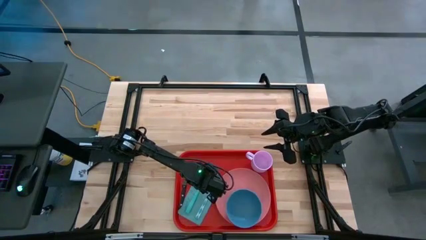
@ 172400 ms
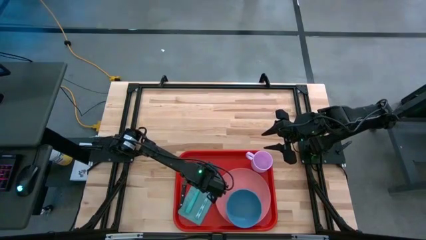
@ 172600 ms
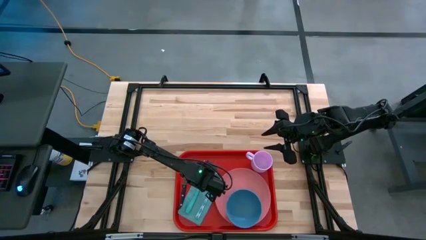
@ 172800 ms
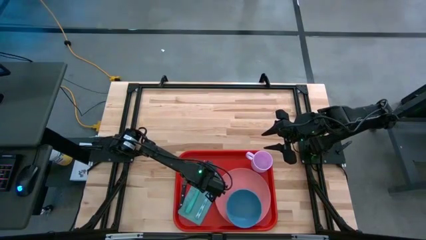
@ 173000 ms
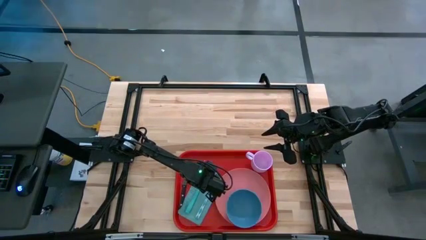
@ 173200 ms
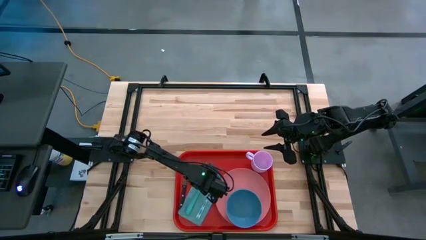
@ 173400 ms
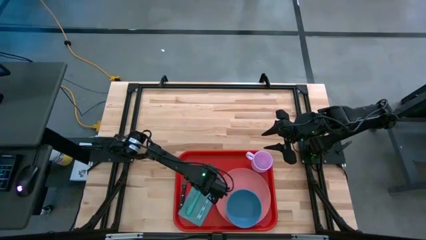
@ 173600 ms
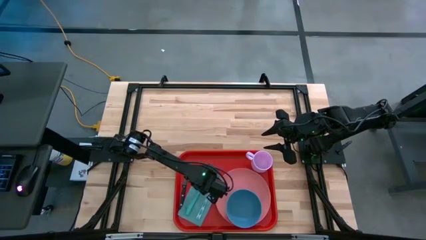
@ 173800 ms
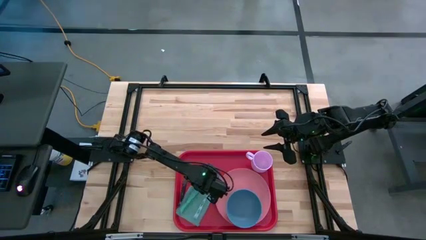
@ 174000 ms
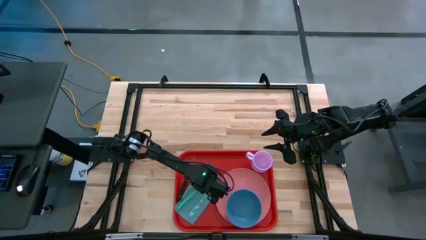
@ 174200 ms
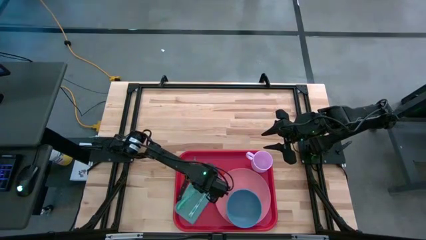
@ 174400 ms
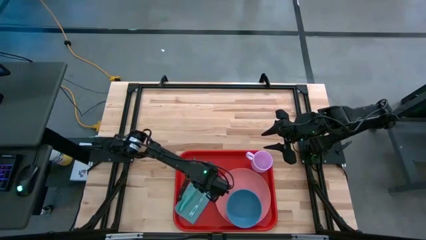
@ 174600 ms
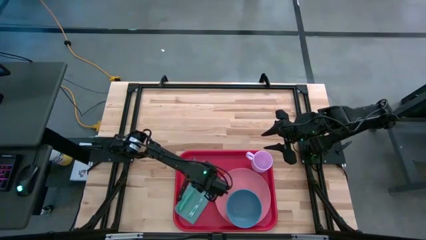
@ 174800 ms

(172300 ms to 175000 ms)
Task: Set up tray
Adjust the blue spoon on the blue napkin

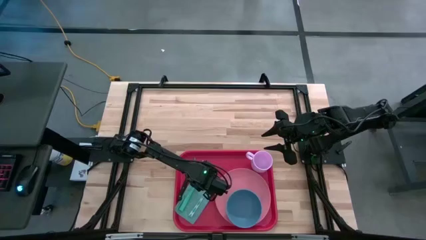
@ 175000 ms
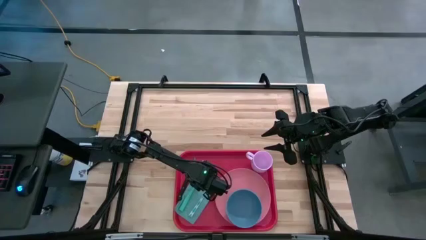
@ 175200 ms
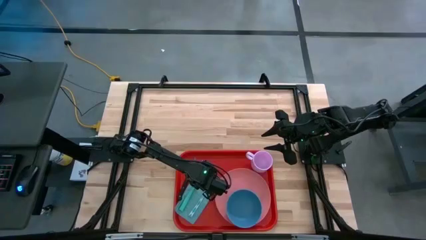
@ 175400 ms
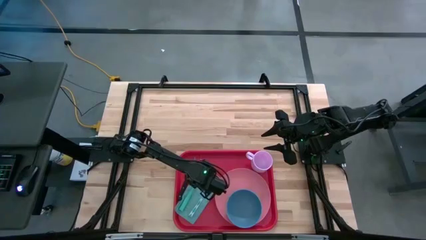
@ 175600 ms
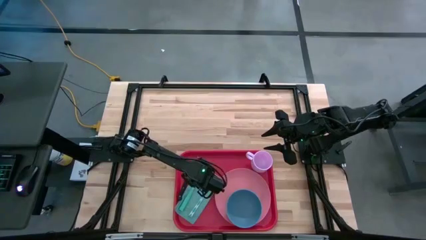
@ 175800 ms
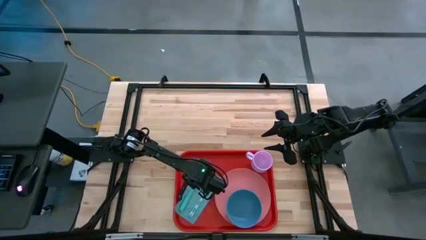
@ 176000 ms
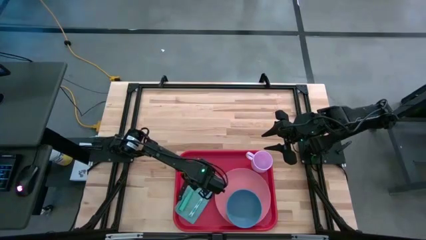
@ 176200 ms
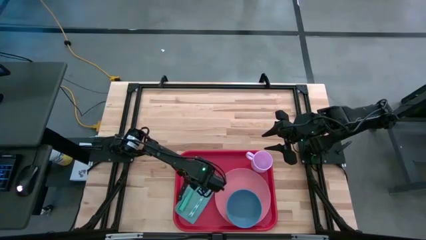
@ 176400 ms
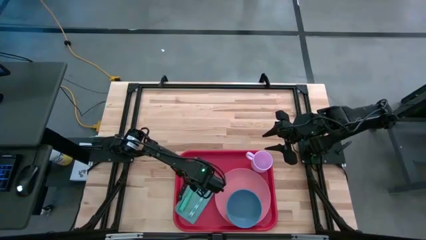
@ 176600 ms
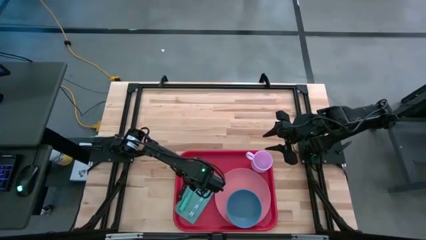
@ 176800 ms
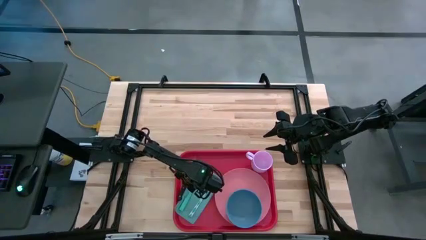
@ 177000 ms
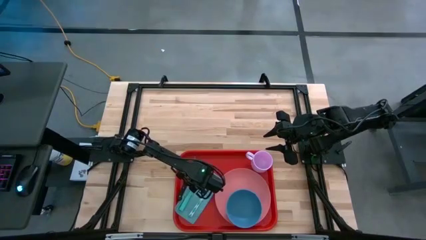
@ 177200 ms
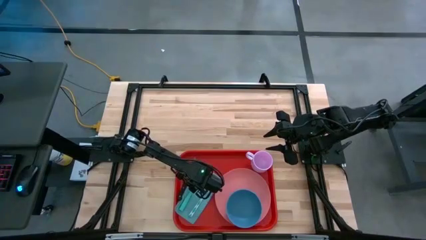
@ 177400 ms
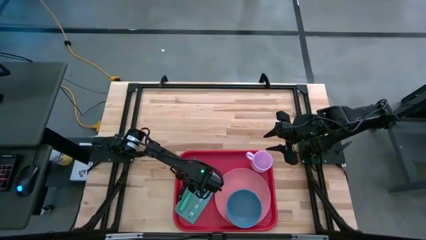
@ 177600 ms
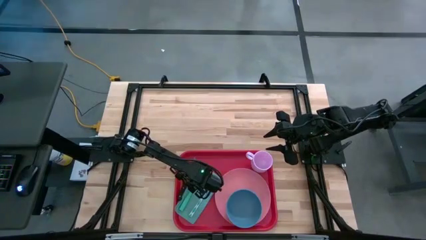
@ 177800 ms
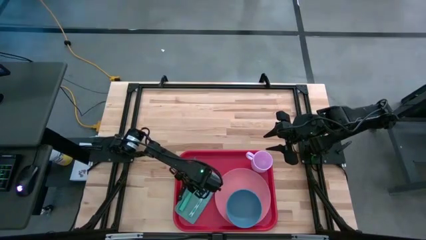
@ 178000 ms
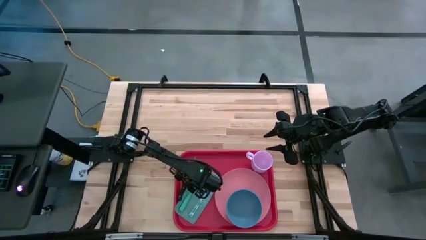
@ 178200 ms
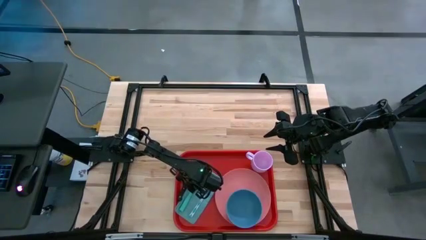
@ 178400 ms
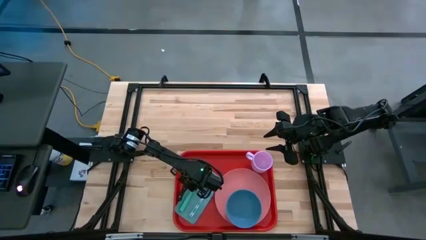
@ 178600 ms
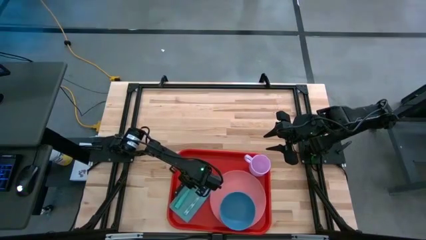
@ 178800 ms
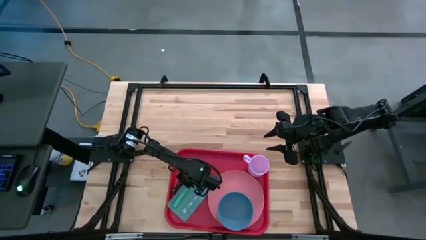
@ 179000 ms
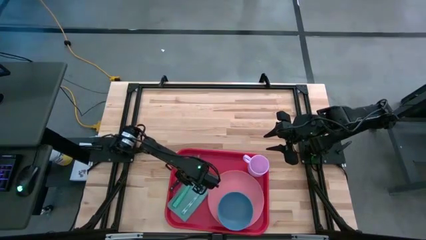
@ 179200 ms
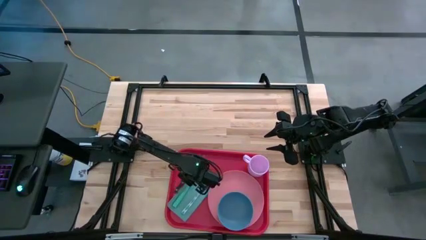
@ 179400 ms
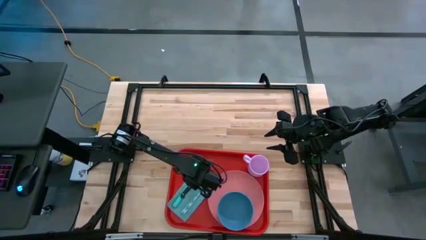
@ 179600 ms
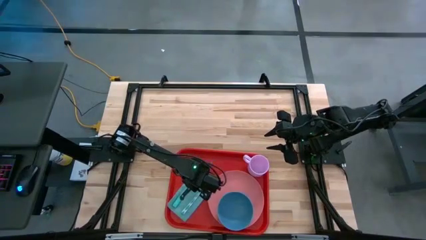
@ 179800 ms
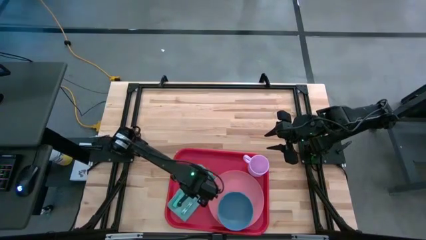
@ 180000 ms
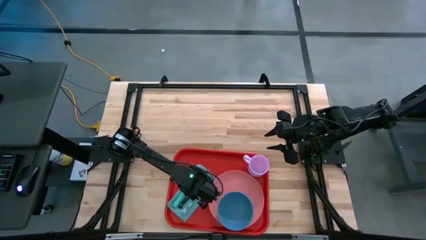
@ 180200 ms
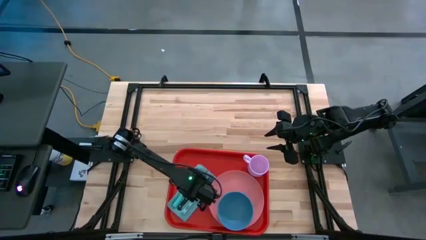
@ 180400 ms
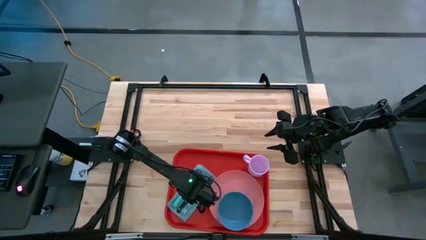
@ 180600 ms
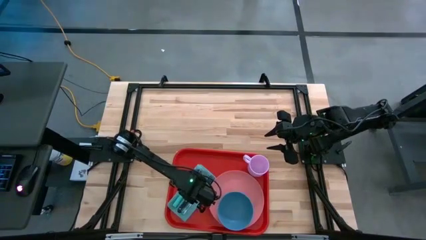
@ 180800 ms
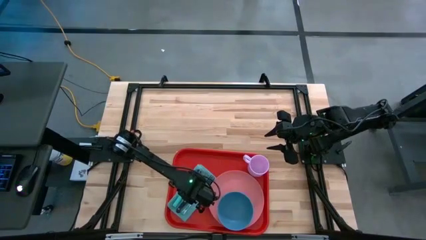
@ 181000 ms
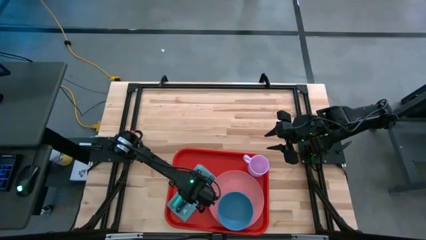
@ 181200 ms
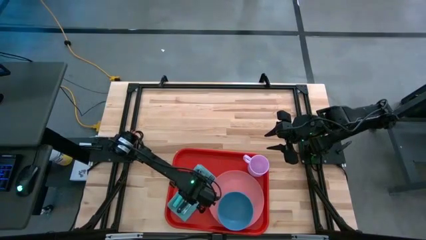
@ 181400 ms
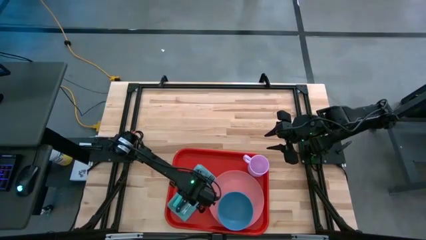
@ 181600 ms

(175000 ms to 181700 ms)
Adjust the black knife on the blue napkin

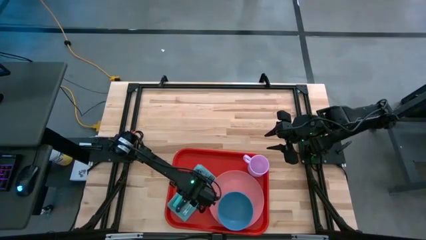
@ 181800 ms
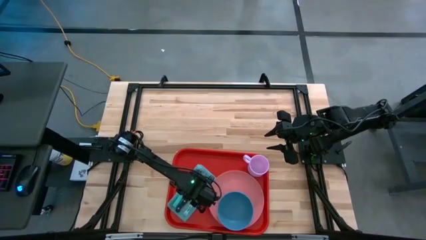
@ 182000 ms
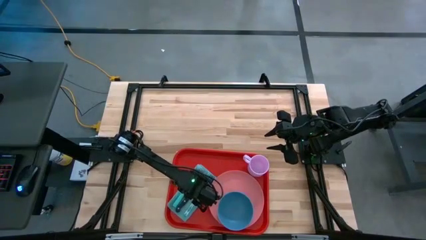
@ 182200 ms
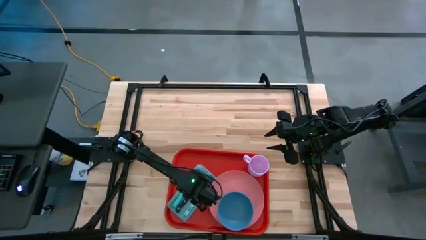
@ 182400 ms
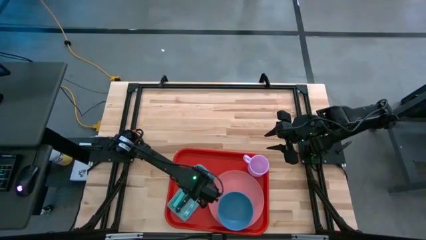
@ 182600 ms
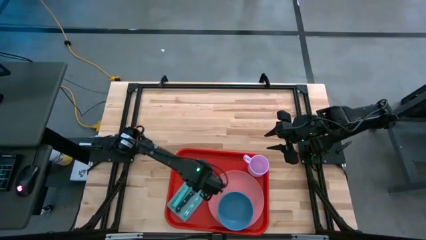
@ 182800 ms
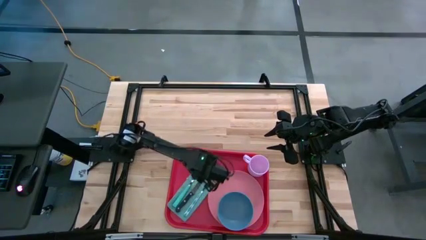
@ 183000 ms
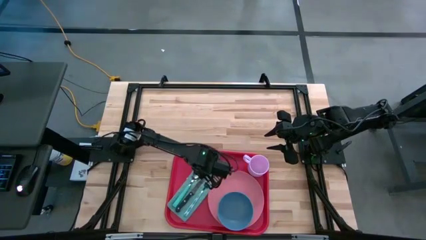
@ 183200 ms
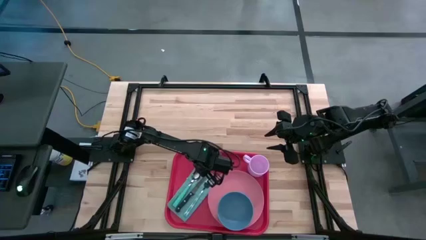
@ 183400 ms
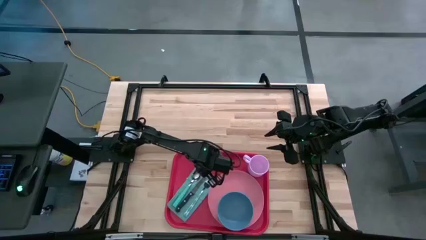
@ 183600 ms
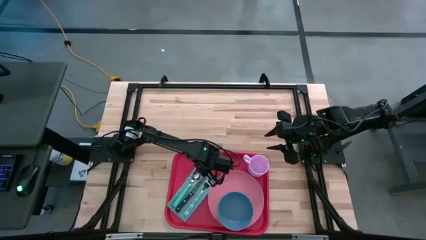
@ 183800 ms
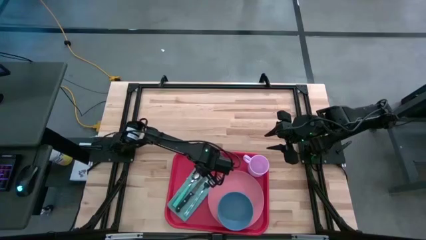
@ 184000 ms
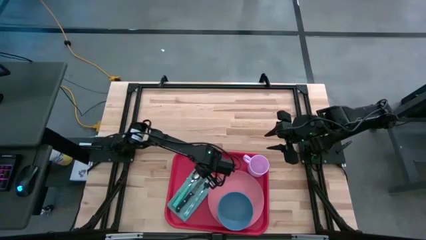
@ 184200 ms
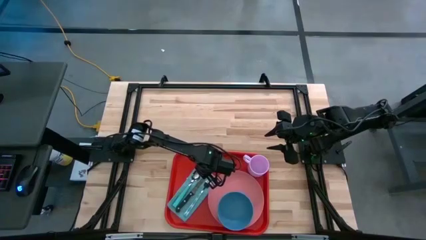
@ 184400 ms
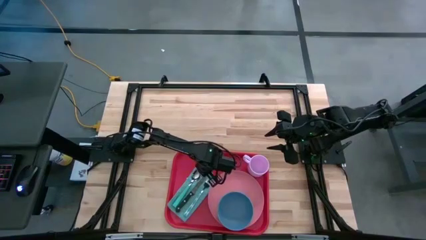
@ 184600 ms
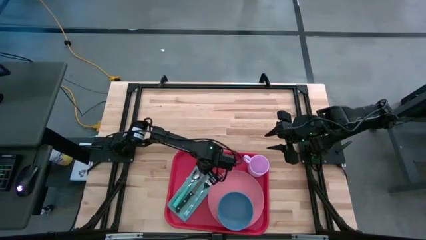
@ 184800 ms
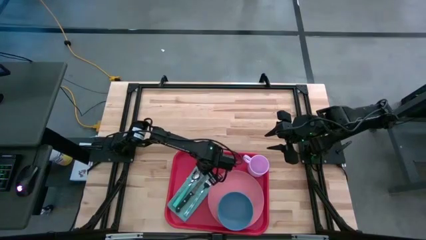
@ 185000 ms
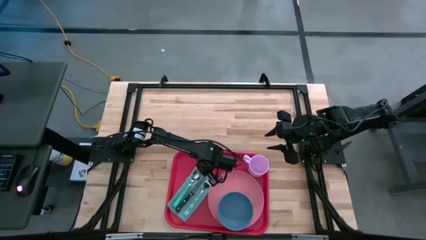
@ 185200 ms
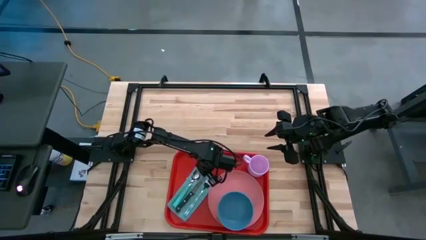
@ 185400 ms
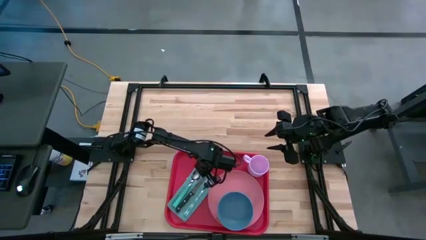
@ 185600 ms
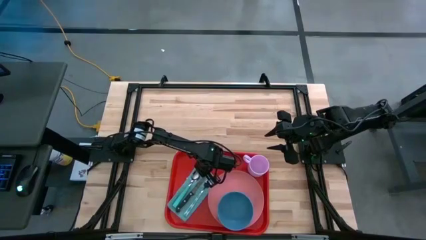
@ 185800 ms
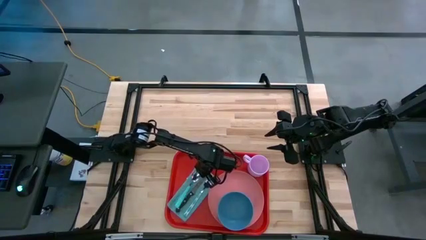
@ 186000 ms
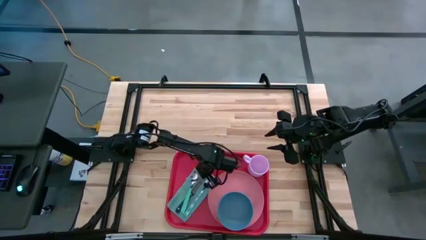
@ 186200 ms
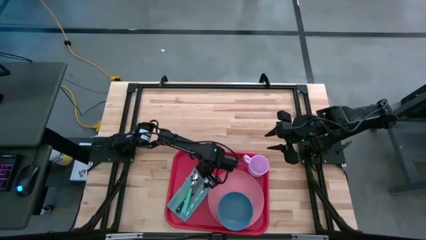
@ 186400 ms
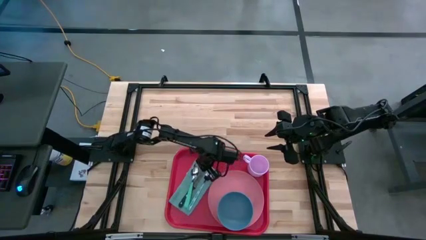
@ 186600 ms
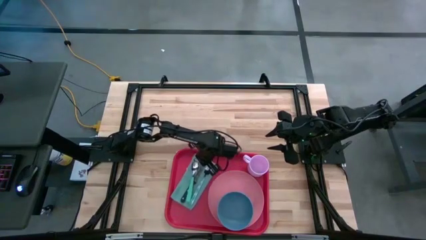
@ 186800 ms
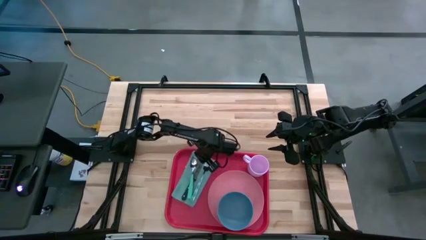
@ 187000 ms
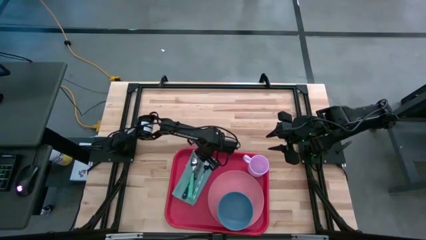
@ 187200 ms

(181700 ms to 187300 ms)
Adjust the blue napkin on the red tray
